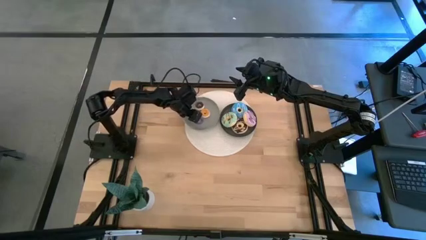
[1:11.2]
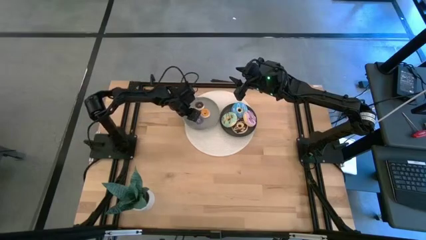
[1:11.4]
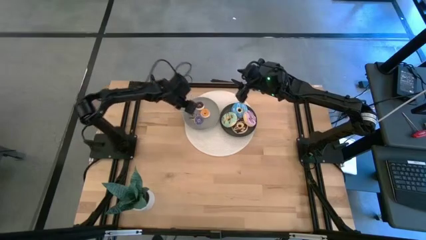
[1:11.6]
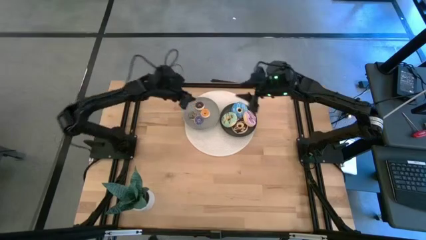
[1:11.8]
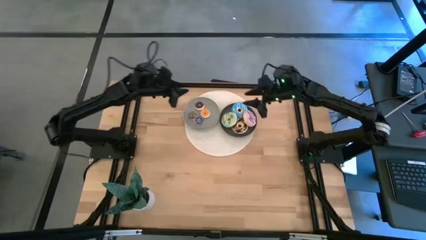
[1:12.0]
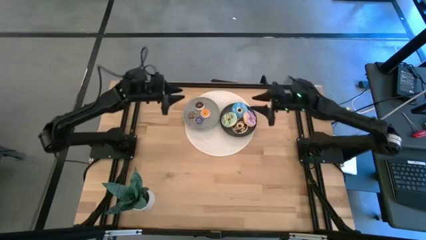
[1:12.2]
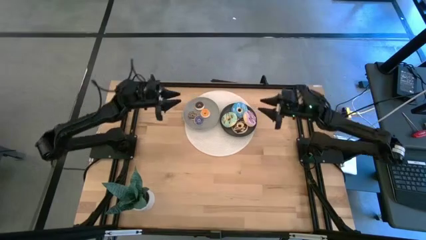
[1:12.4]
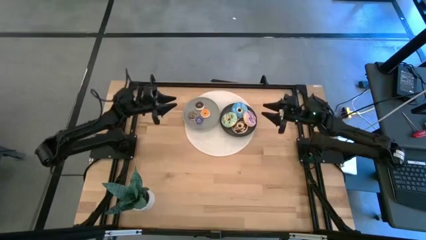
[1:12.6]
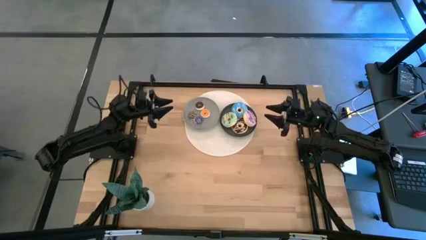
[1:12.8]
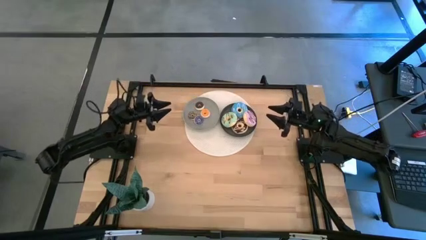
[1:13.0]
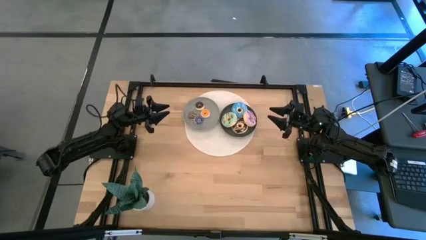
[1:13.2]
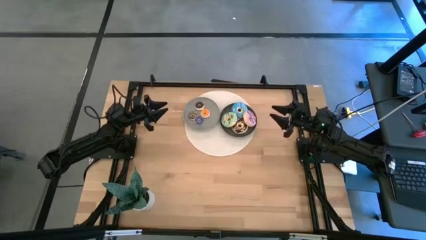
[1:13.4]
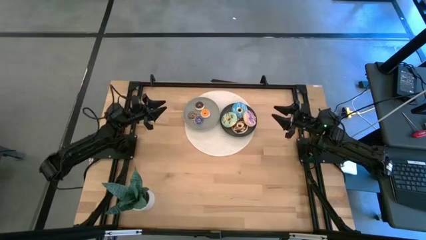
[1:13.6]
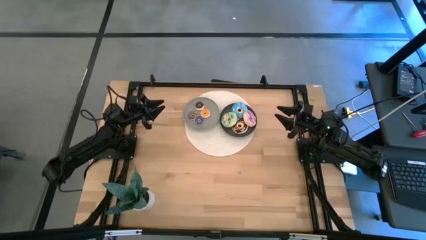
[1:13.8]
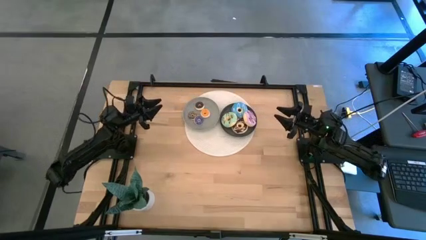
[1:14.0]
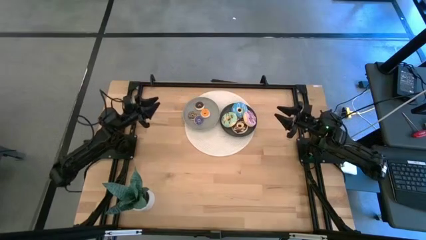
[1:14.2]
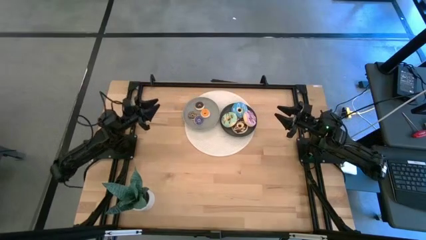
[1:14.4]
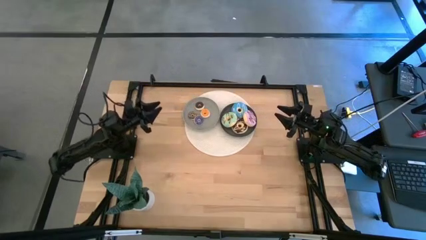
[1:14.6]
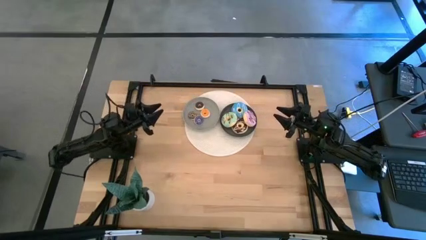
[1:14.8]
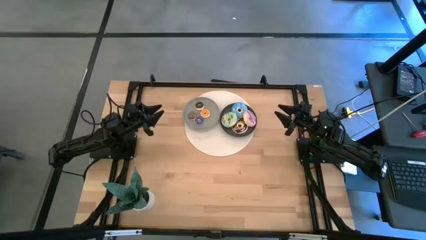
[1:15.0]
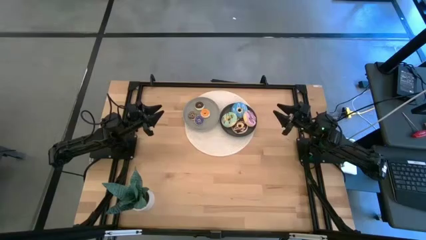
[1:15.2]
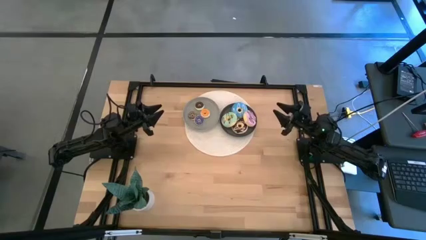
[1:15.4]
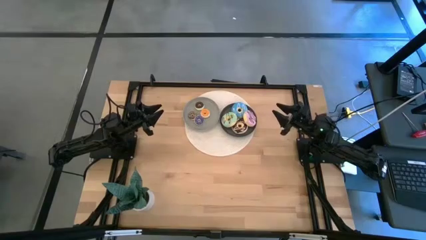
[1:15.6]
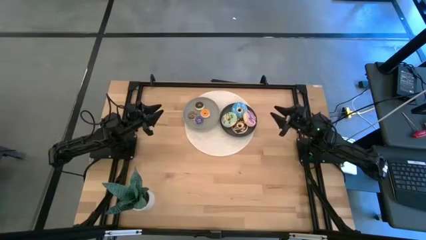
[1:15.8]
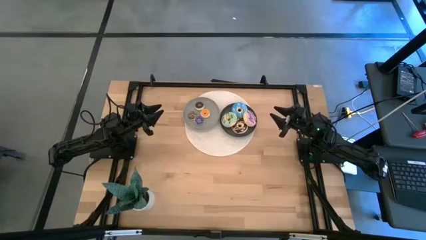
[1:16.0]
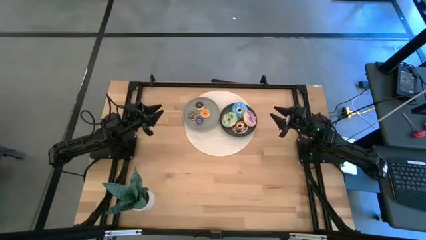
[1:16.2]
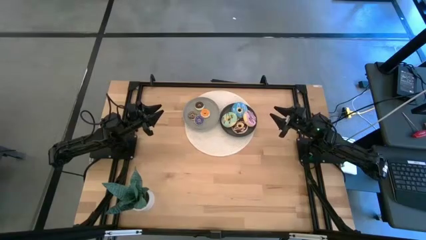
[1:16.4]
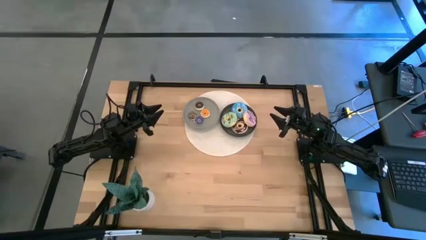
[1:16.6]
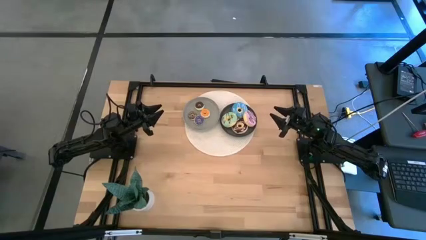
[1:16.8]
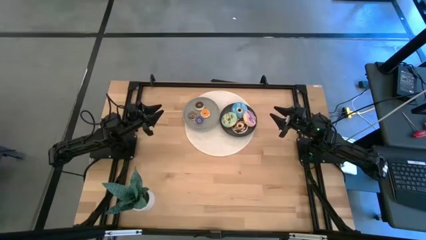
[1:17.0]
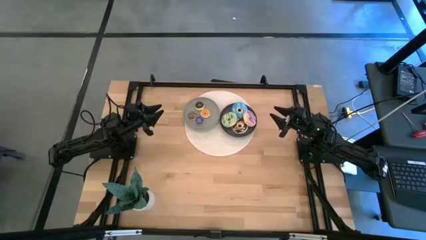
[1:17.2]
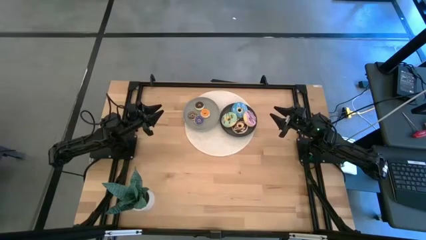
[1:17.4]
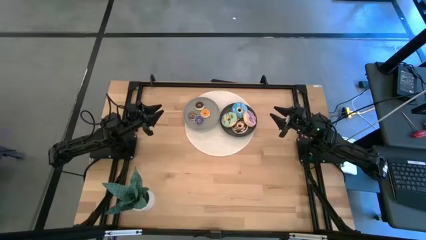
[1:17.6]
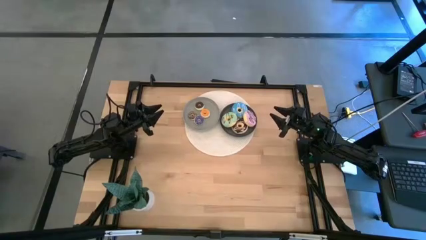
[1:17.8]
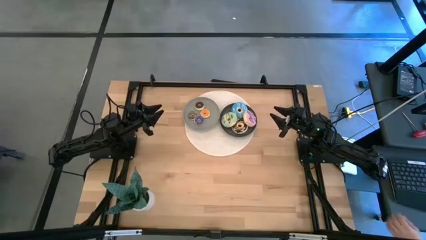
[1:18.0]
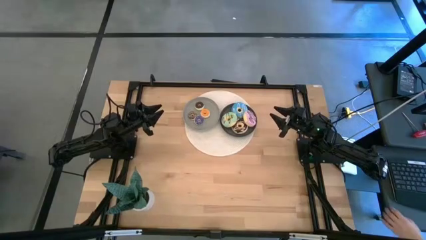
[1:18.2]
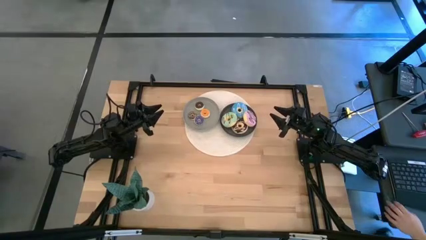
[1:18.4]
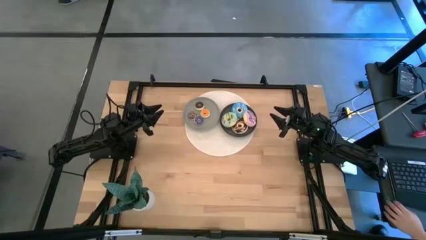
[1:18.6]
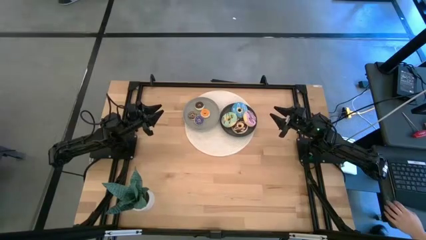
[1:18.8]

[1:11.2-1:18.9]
Task: Pick & Place donuts
Return to Home Position

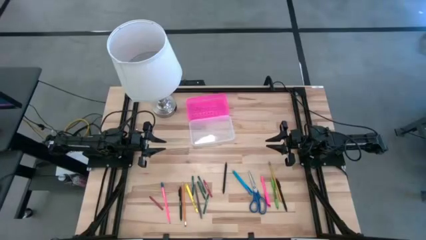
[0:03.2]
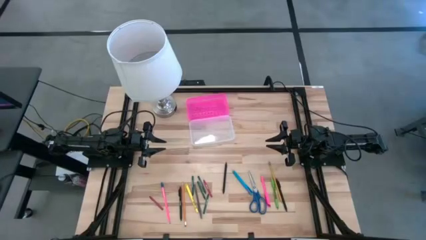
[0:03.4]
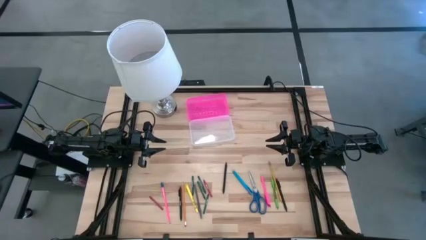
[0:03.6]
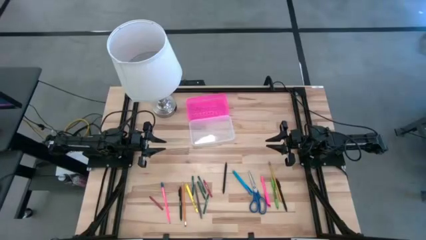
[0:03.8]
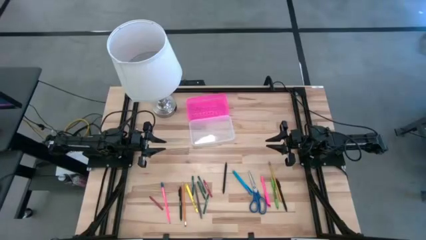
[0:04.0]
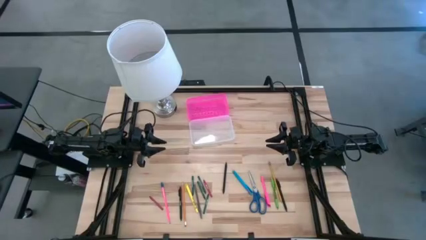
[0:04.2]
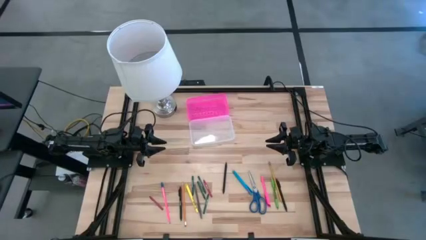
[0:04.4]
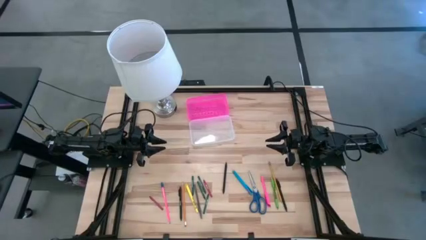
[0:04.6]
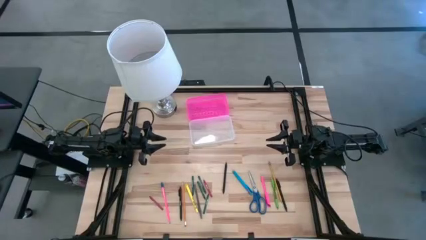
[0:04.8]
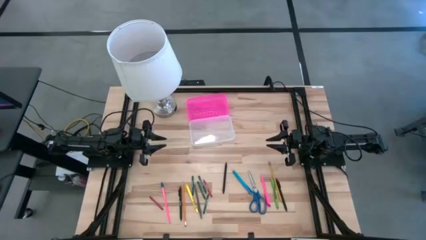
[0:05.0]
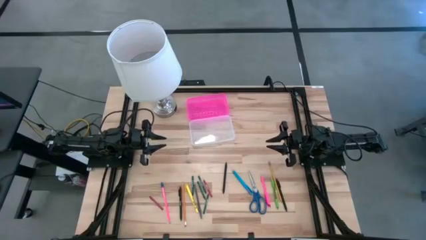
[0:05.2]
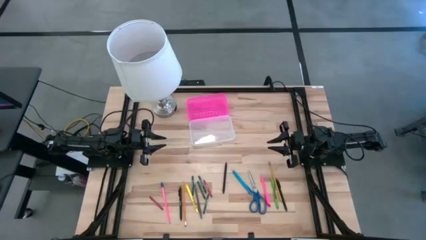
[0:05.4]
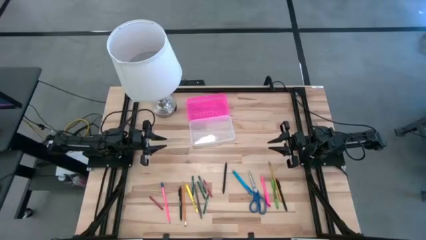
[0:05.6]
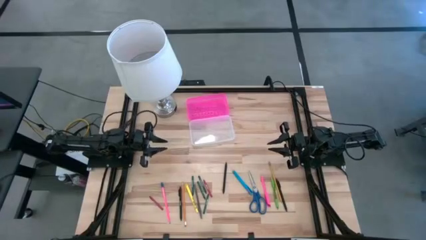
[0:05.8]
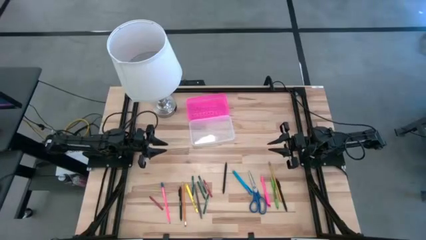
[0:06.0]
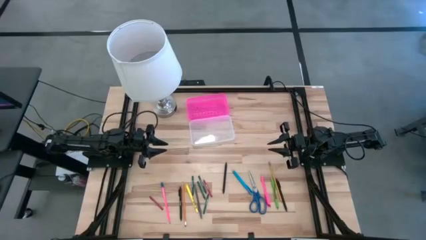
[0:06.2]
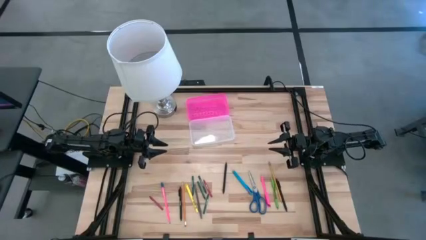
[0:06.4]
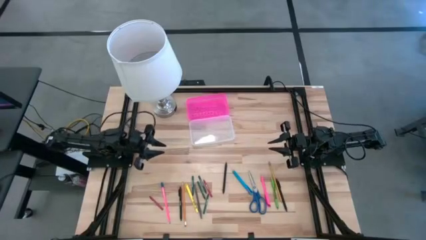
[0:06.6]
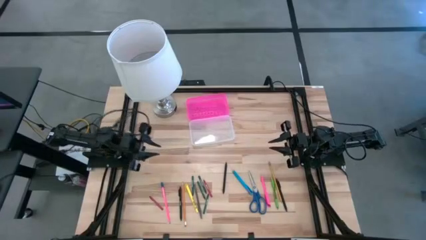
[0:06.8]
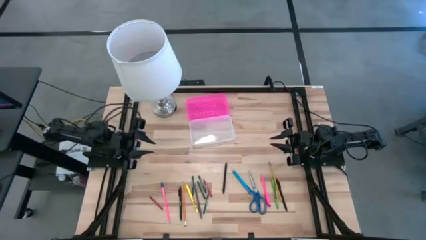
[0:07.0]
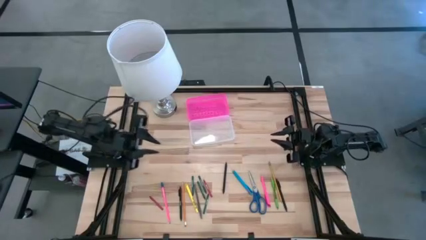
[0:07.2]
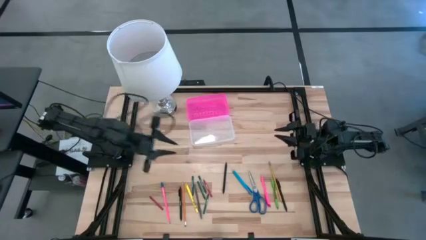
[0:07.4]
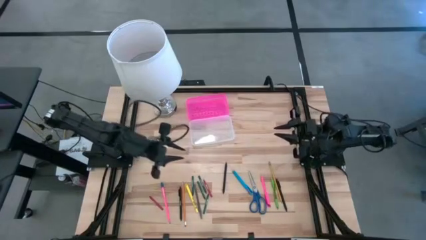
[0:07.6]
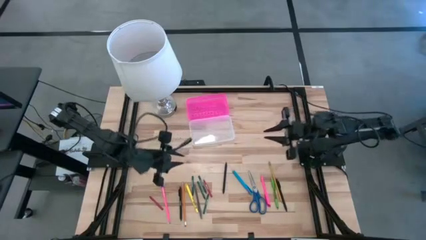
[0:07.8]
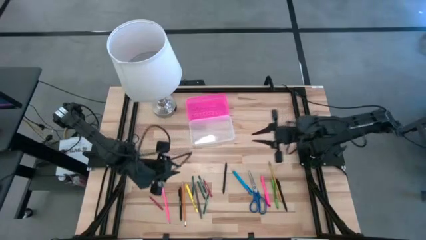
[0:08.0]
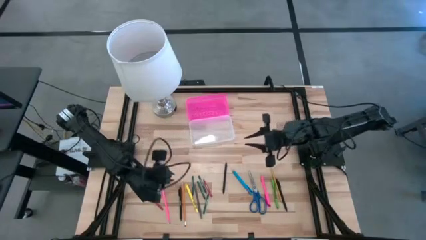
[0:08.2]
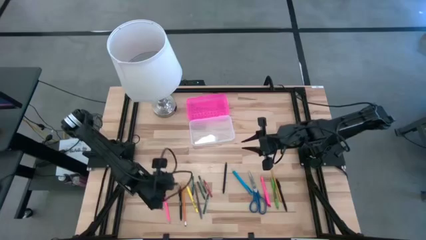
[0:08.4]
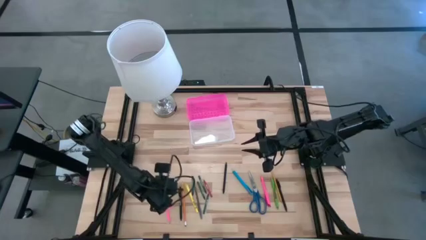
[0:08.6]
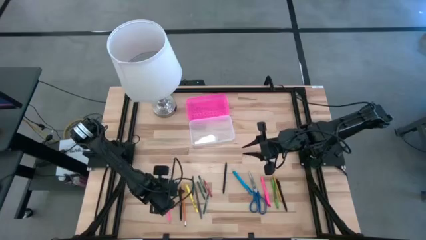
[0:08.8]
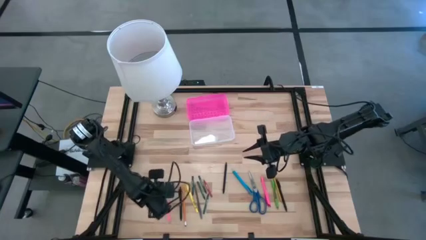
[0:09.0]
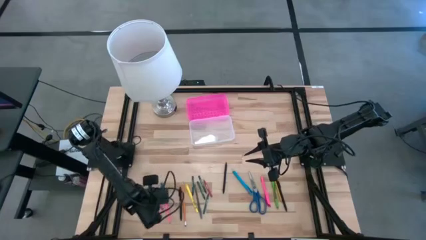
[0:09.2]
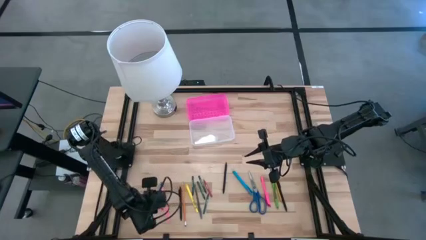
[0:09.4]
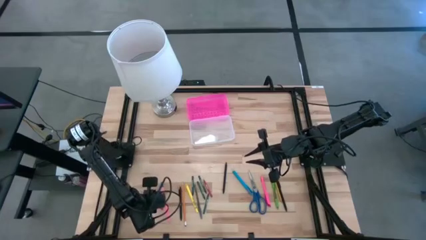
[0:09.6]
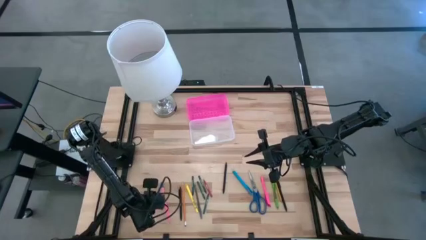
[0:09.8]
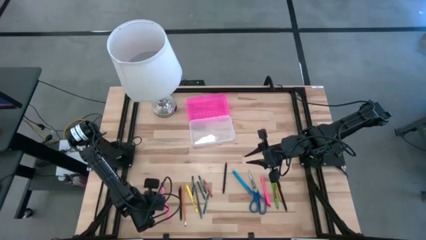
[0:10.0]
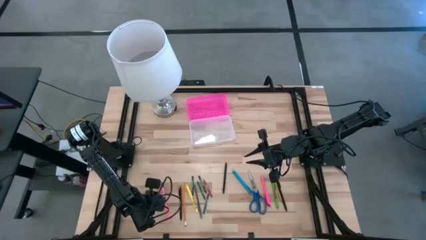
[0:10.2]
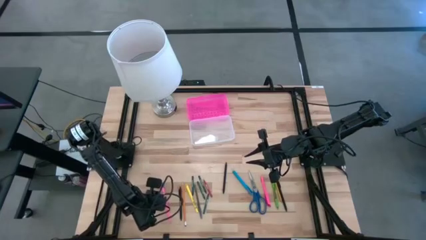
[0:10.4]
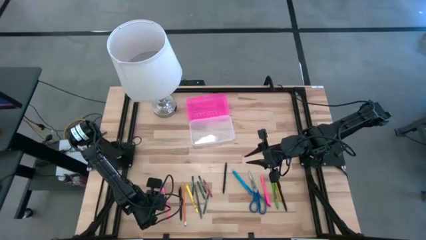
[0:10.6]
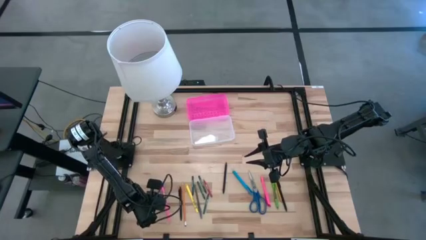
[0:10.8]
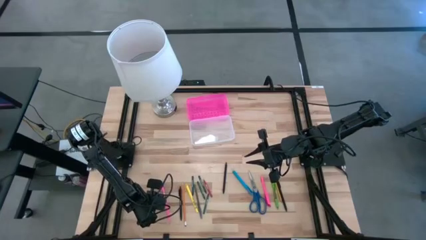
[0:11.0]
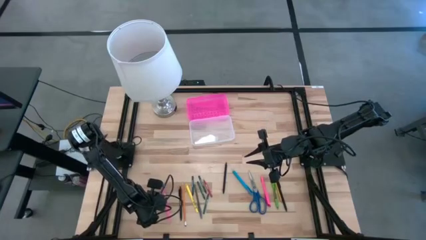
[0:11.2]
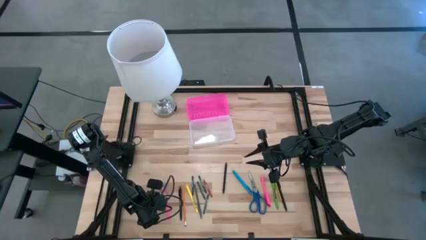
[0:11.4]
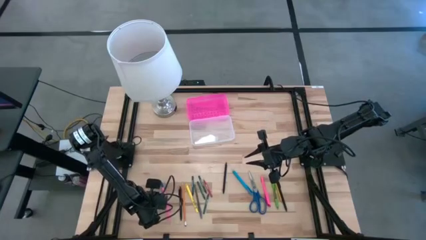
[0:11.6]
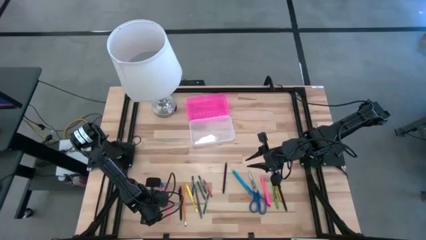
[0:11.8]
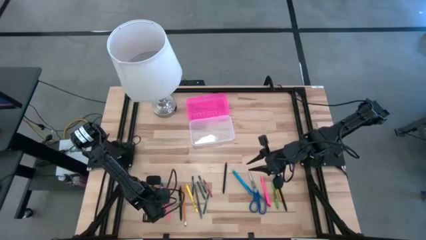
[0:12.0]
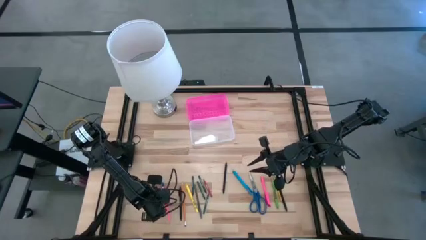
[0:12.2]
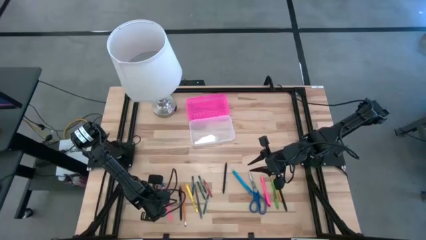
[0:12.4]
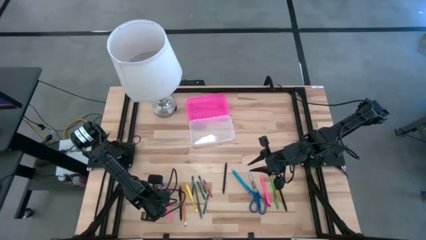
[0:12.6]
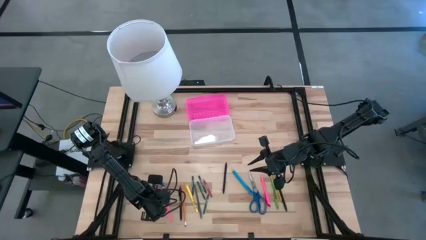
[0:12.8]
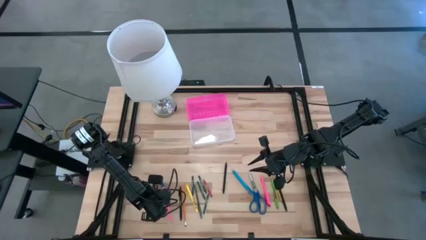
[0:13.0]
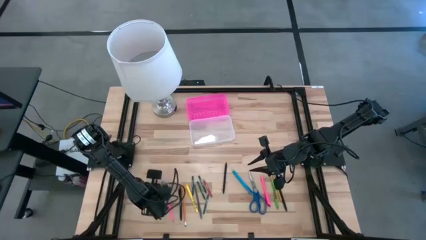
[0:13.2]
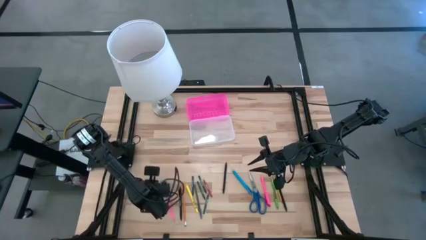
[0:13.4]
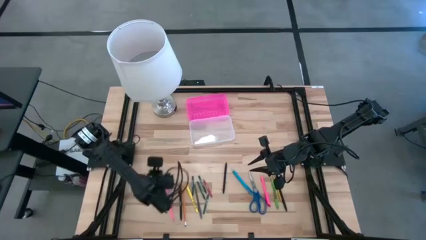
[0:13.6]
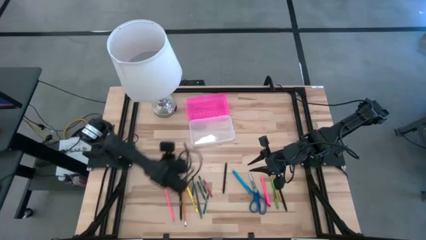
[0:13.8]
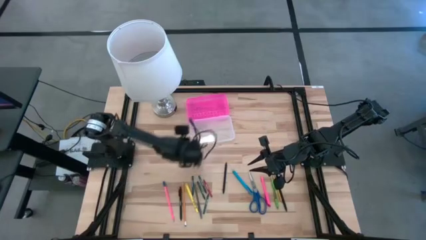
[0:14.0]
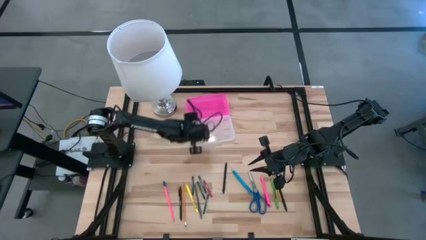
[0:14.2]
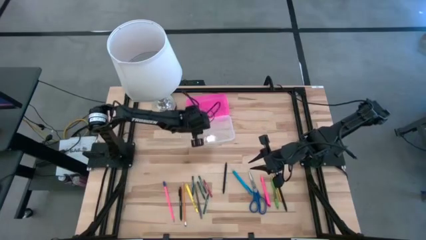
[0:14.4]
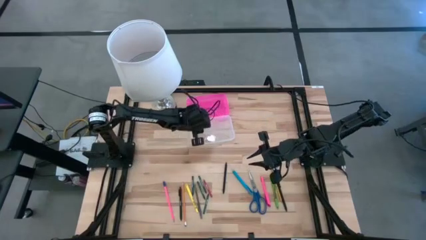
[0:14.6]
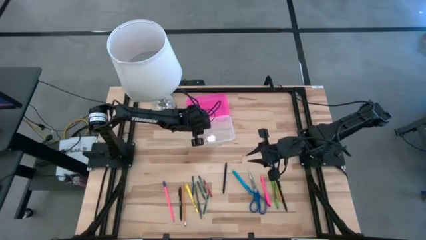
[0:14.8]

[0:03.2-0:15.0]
Task: Pick & place school supplies into a supply box
Put the red crayon into the pink supply box
